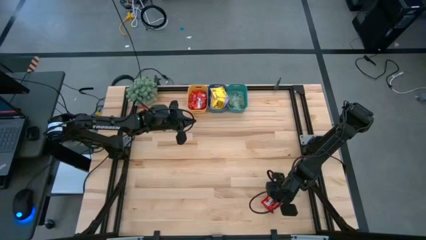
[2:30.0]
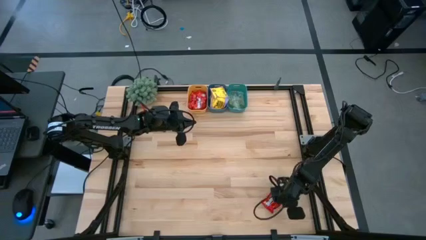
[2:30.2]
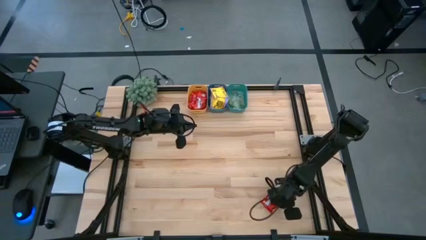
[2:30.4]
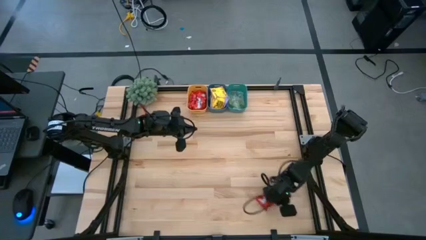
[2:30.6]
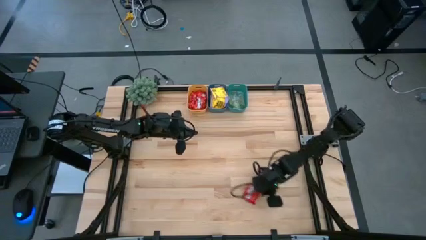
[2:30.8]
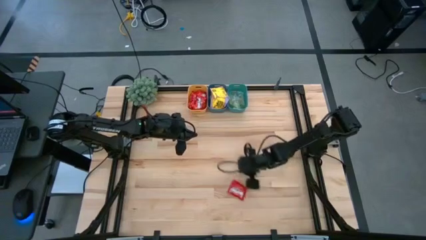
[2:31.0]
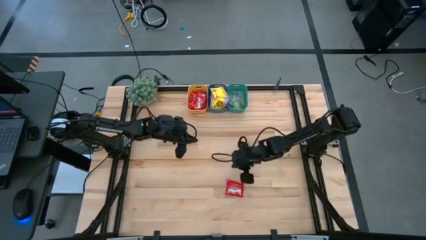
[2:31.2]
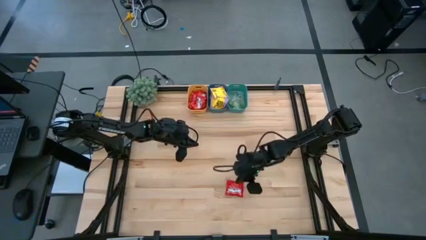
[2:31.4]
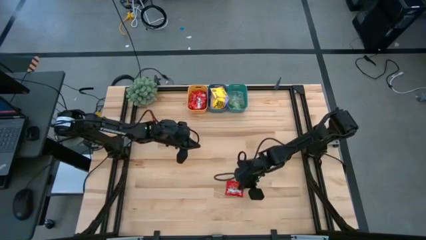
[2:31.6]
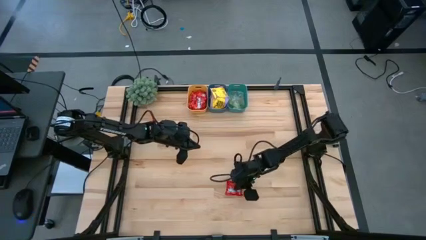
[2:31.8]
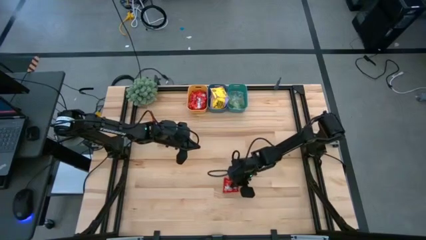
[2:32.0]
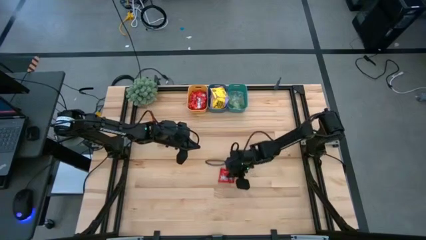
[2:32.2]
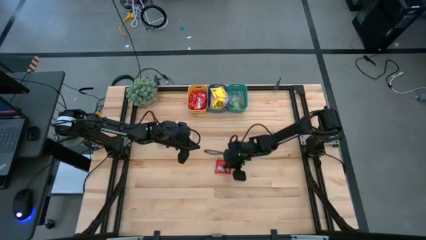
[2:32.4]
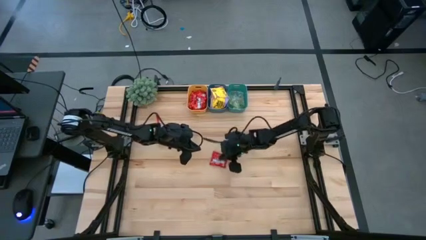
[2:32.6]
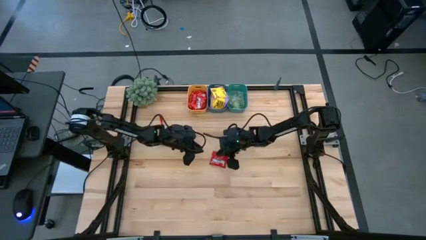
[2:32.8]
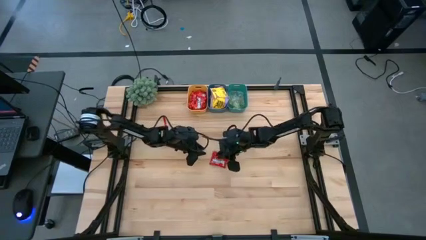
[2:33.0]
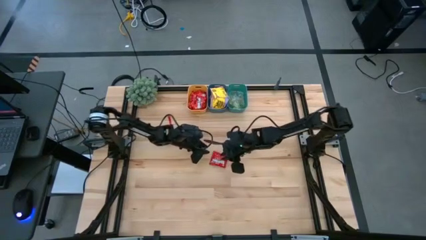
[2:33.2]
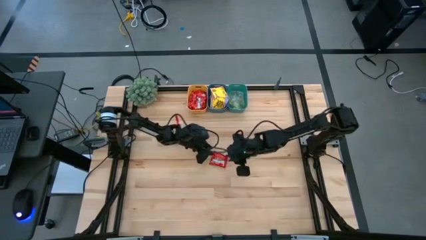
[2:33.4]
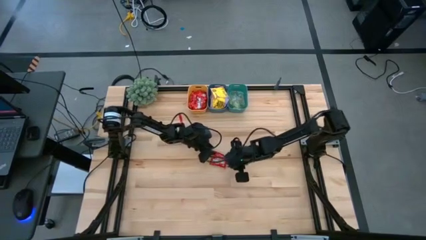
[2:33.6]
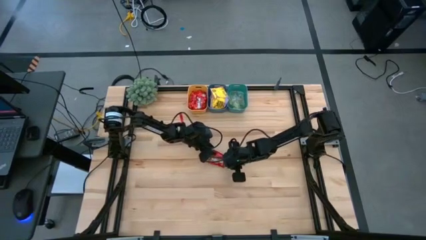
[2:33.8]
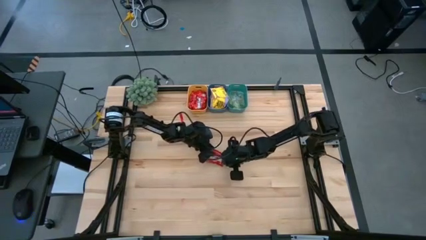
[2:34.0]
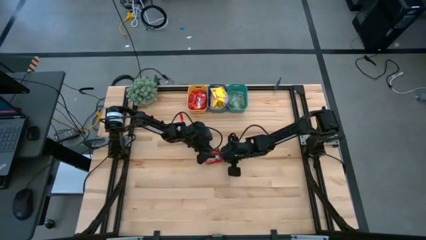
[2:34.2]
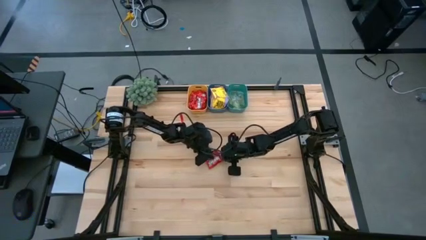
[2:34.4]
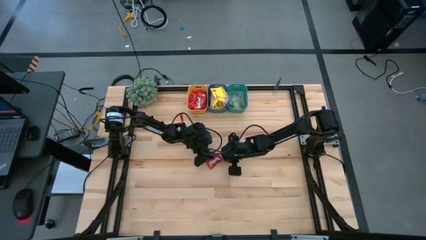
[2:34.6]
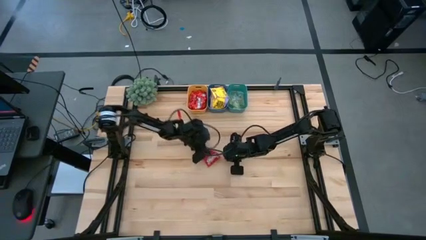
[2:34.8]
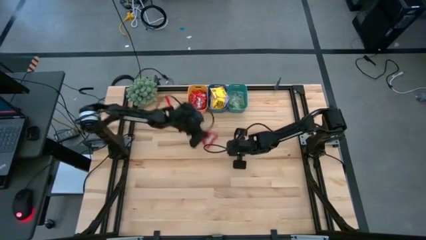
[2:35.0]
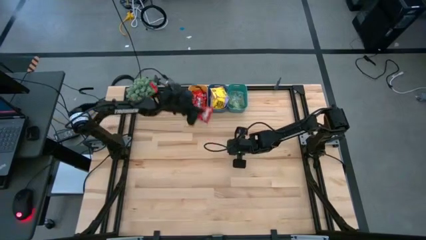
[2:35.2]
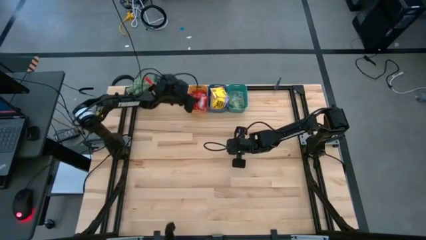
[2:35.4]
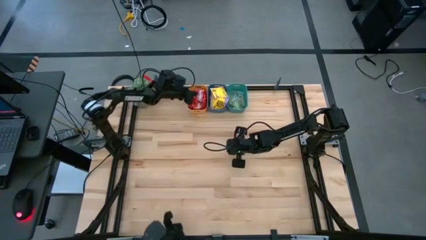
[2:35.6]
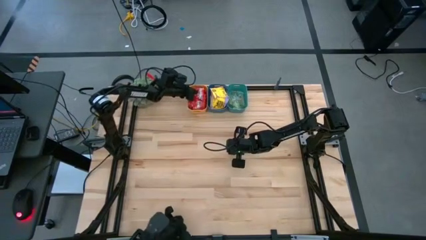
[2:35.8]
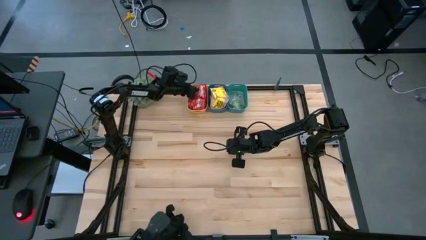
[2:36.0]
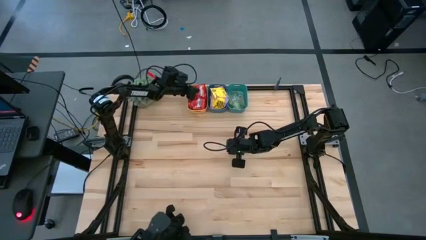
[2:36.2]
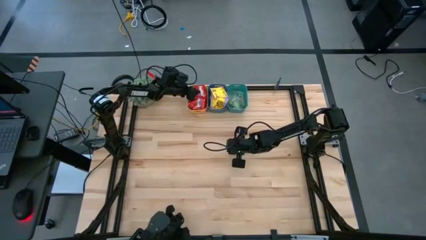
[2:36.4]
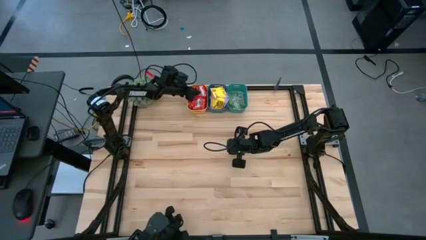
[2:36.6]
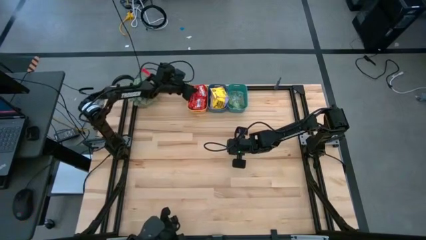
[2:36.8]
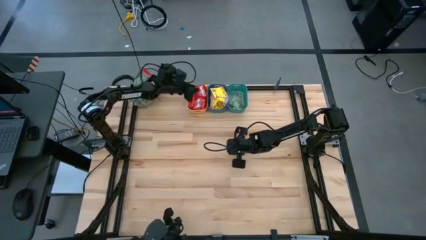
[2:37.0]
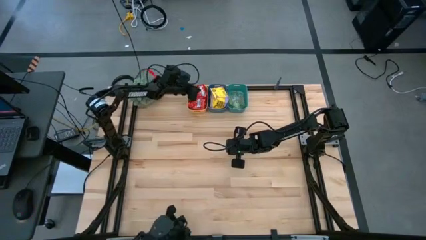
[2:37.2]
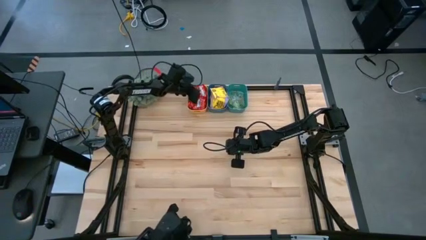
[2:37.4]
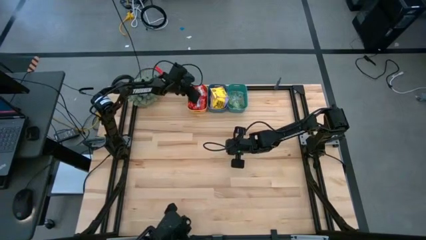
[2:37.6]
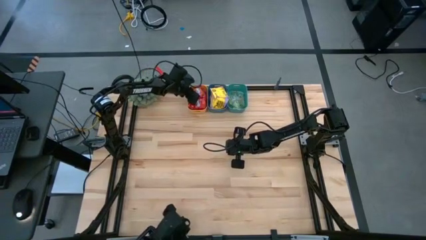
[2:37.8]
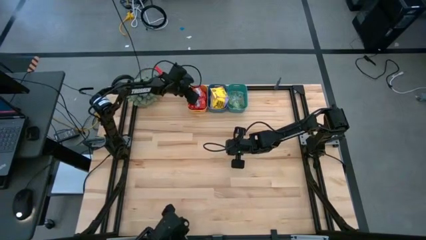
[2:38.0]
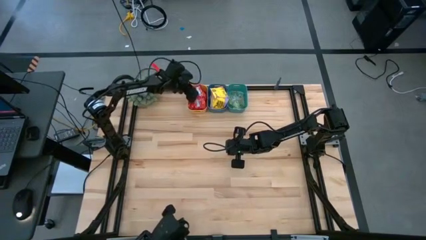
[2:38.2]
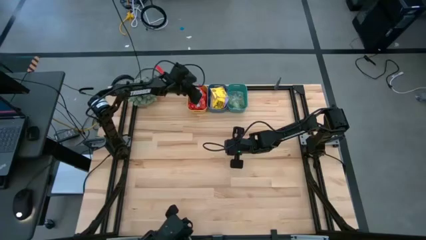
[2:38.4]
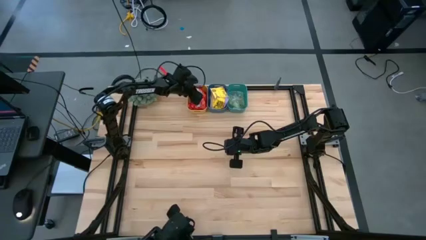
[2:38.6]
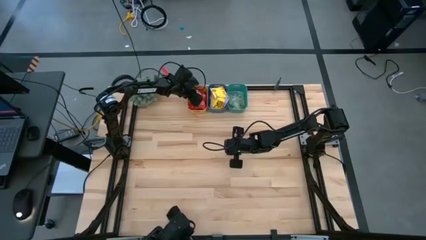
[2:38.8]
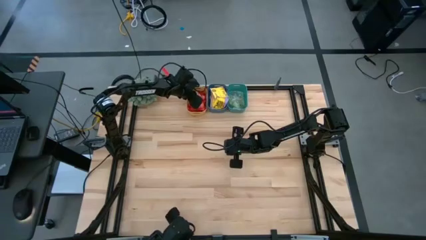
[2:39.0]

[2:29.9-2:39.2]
Task: Sort candy
Put the red candy pack into the yellow bin

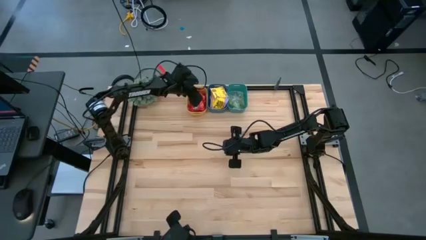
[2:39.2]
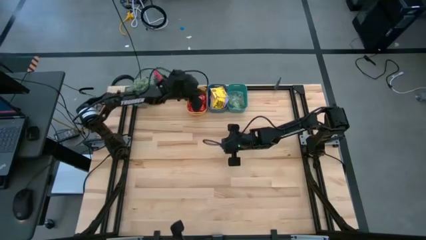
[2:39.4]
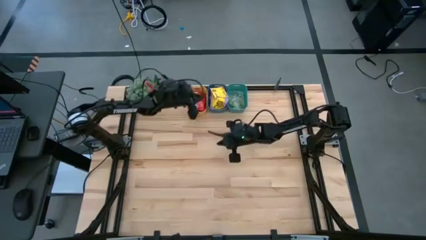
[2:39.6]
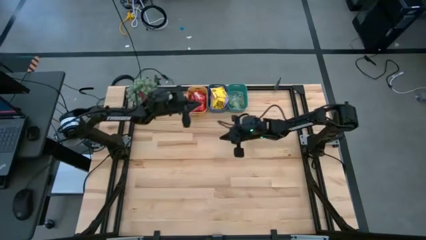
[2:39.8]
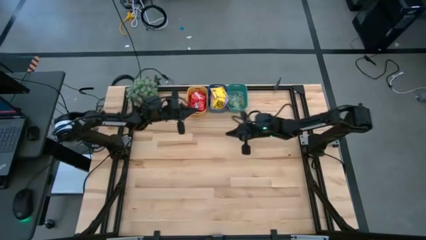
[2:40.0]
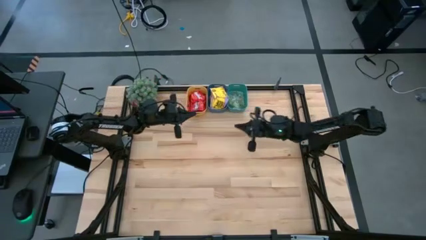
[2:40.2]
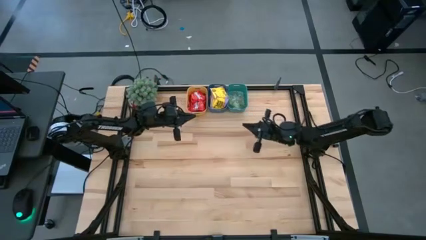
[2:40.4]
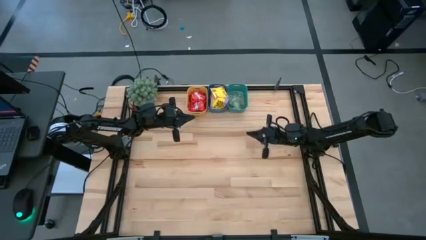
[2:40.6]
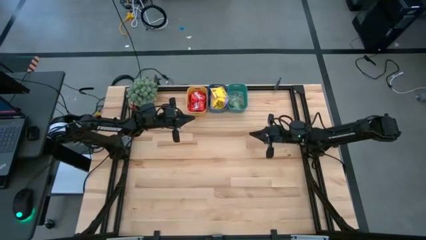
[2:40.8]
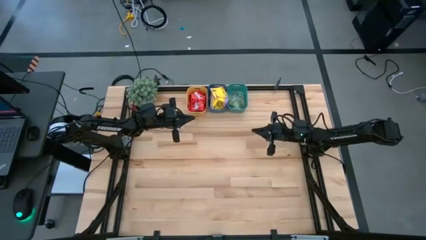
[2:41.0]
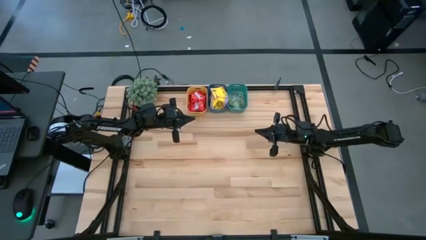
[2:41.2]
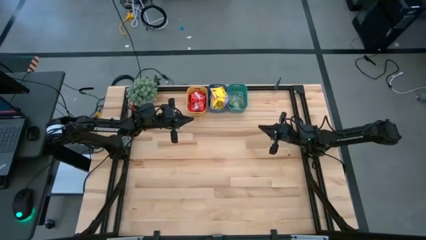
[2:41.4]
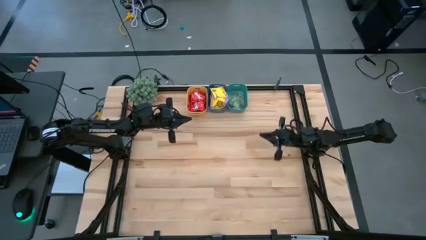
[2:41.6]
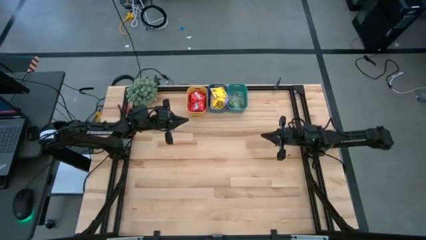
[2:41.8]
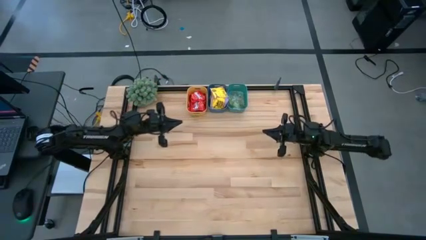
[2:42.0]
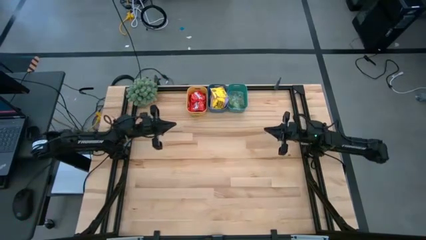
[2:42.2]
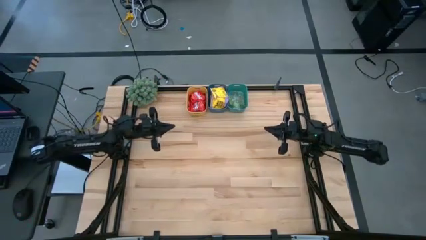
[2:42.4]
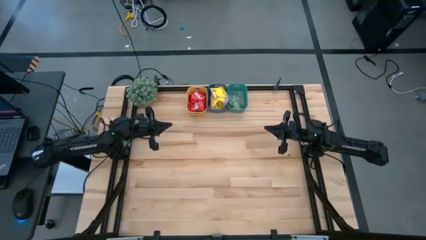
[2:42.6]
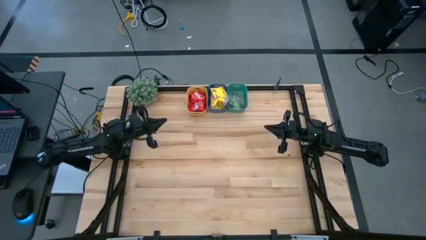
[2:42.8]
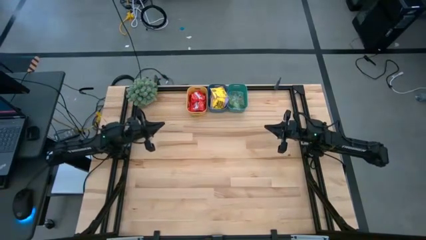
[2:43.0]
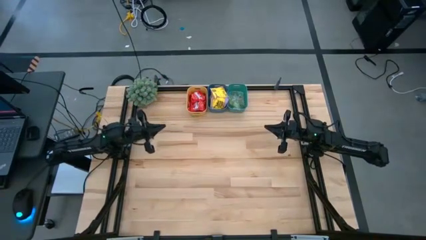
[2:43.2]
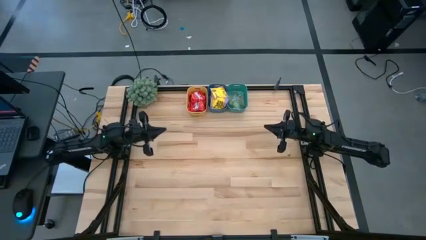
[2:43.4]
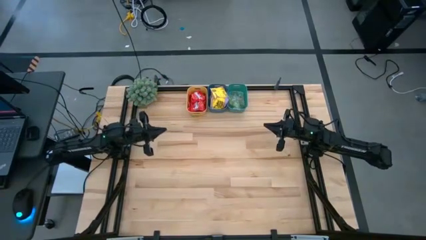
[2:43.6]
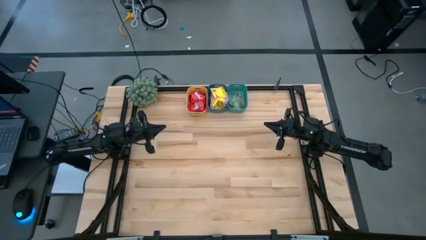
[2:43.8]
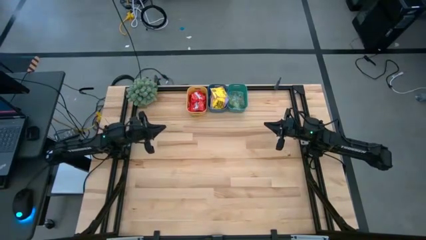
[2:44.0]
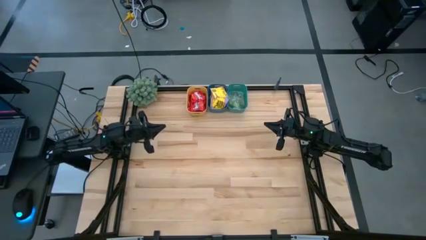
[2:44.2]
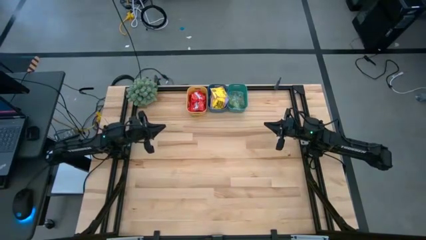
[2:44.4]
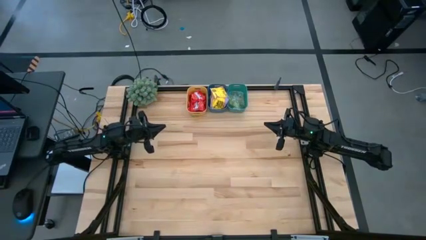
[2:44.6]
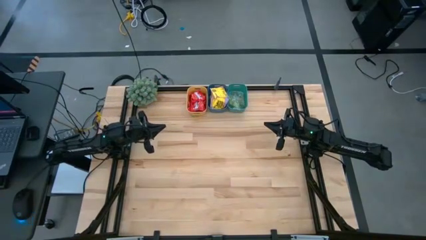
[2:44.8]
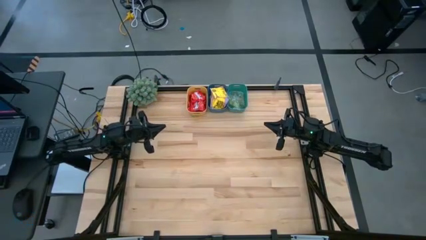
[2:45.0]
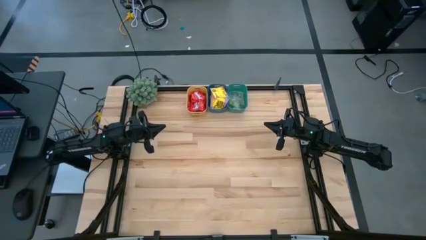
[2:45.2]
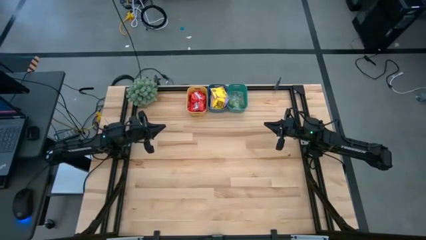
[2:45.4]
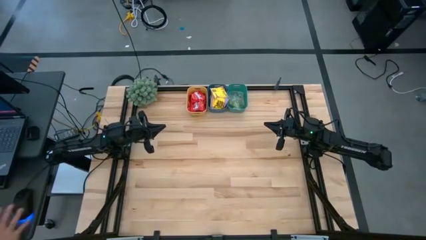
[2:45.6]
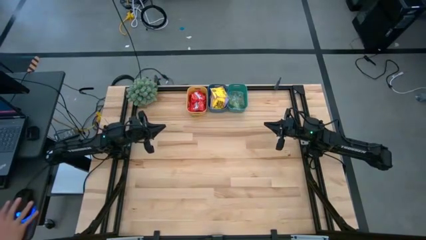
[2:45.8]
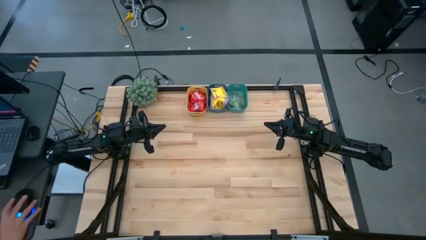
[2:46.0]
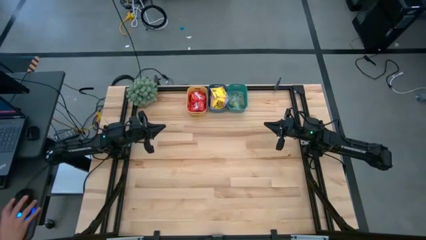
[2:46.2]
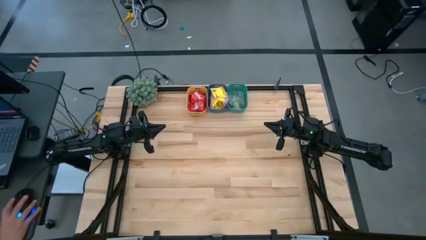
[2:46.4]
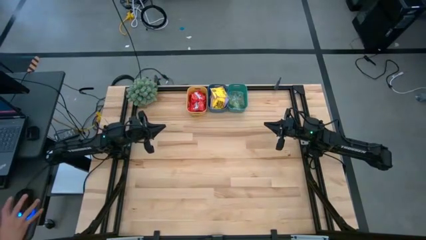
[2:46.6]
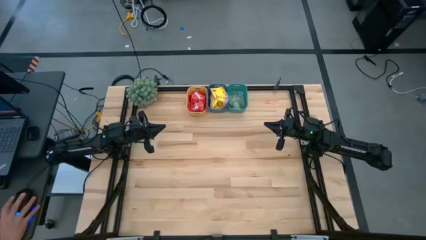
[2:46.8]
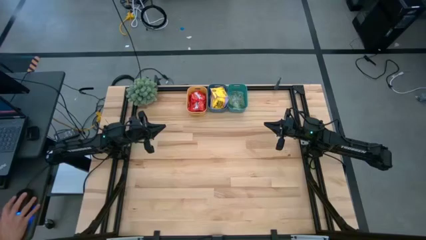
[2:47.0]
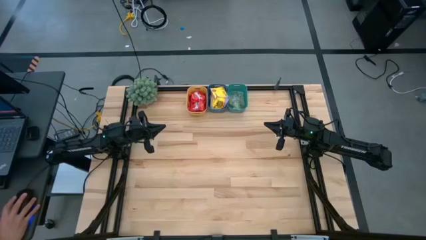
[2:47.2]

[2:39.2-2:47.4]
Return to Home Position
